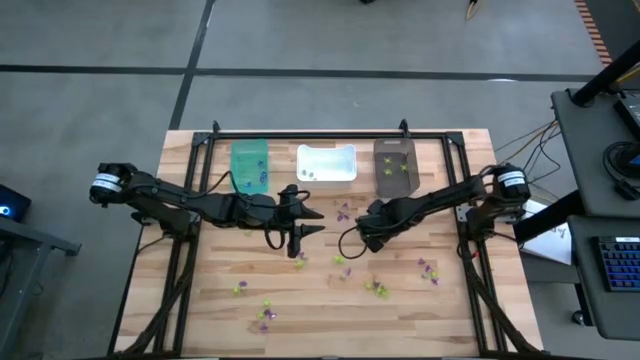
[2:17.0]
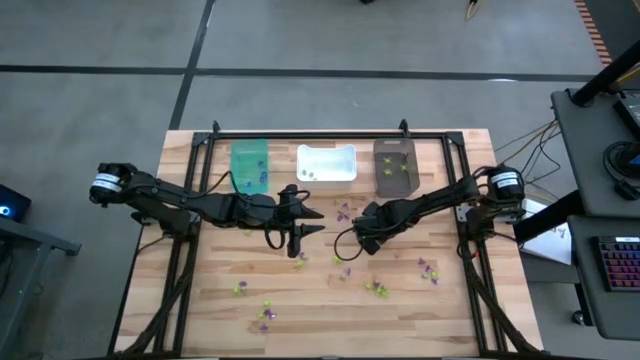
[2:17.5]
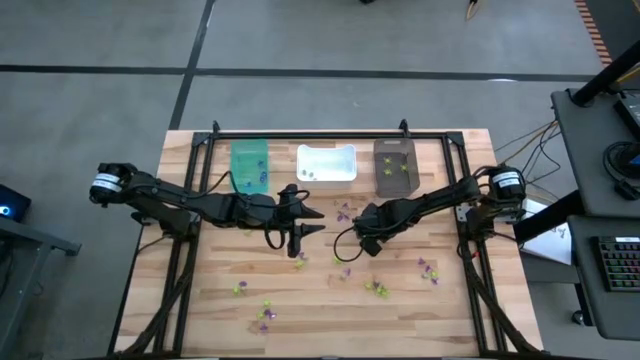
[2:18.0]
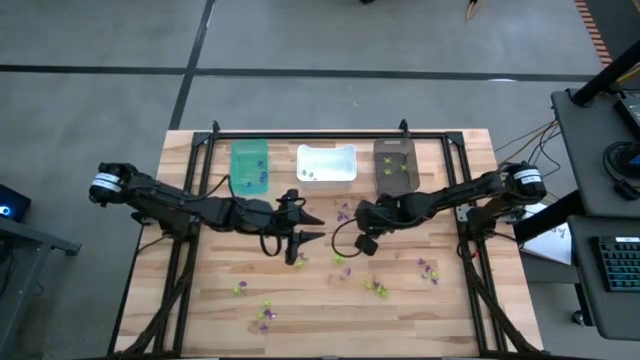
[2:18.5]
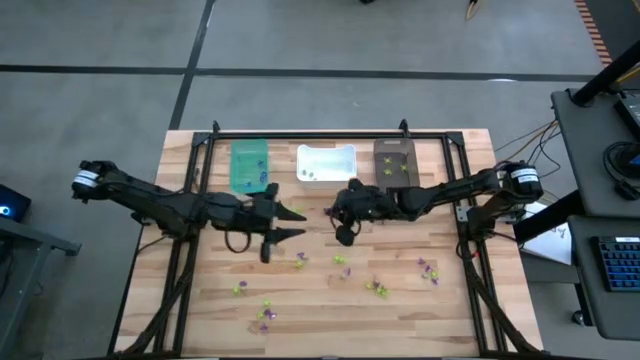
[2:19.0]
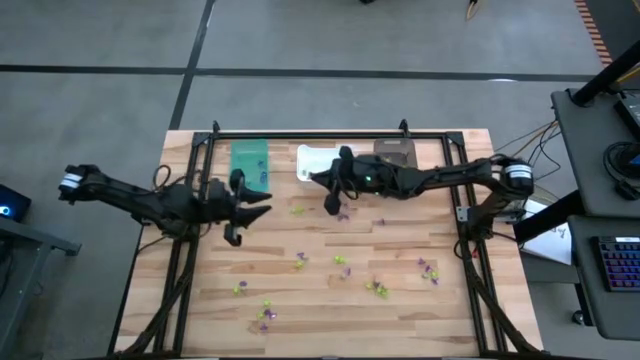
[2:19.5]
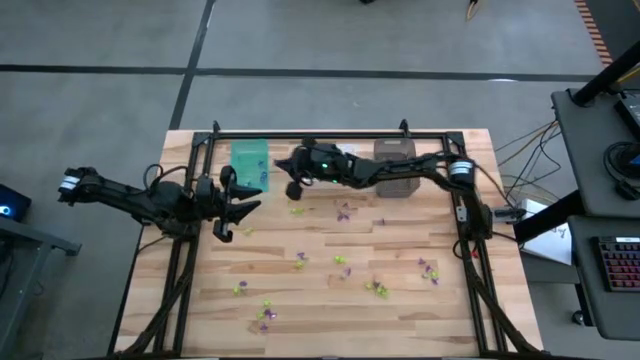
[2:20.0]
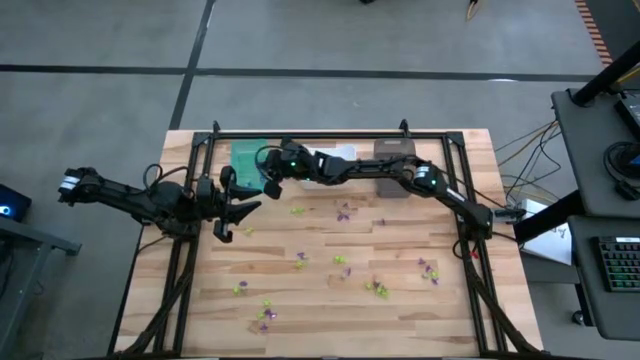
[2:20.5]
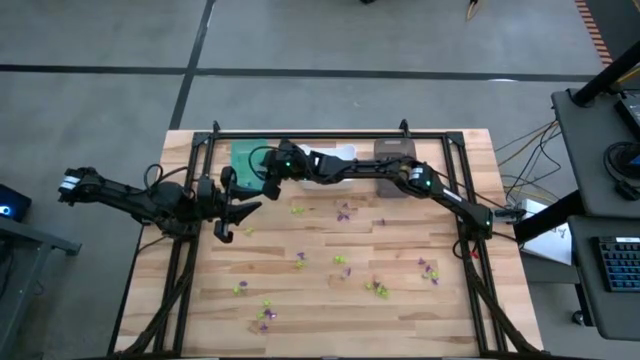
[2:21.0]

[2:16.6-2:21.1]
Task: Sort Halloween decoration
Put the purple witch hat toy into the light blue bin

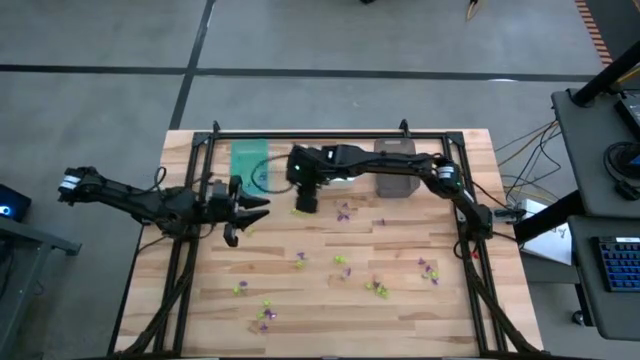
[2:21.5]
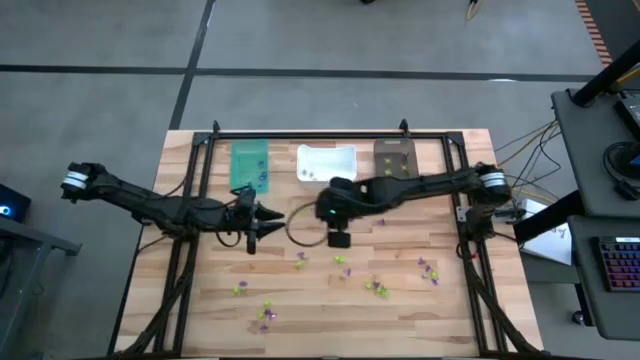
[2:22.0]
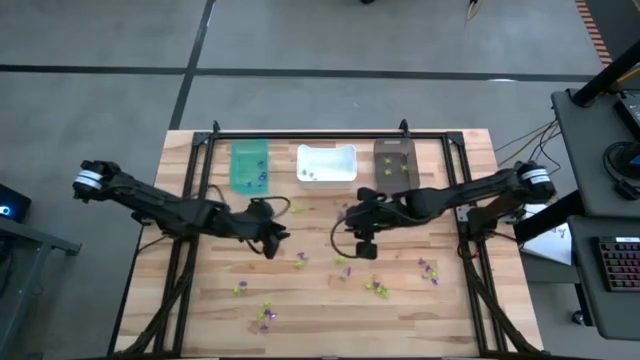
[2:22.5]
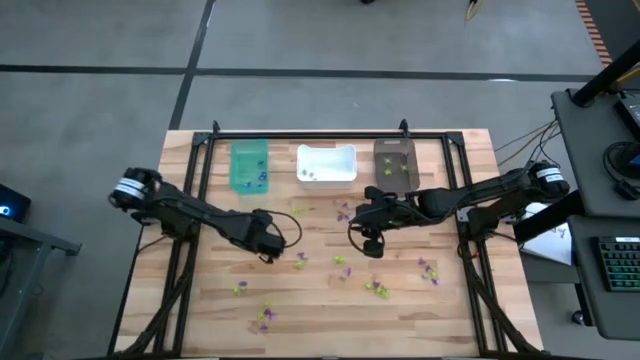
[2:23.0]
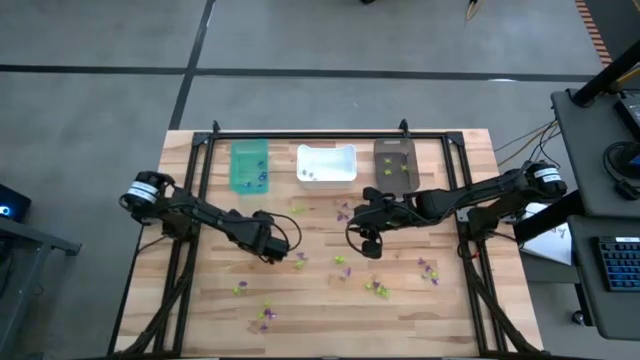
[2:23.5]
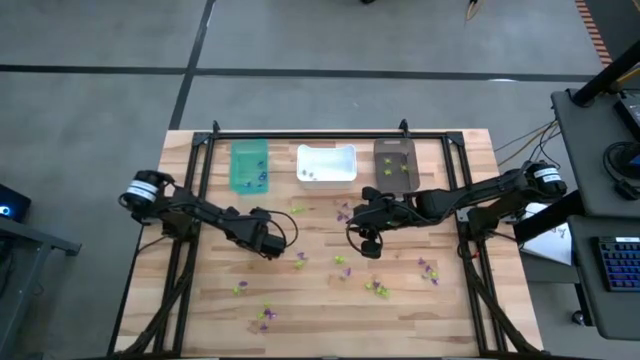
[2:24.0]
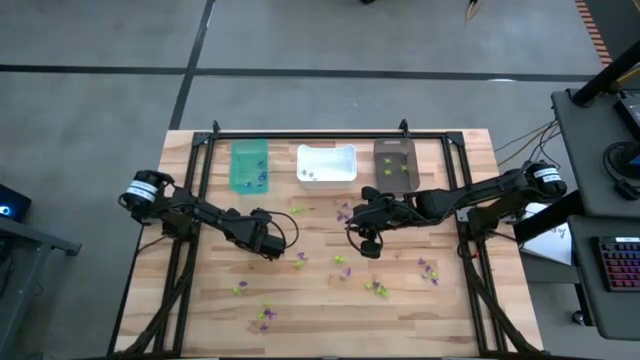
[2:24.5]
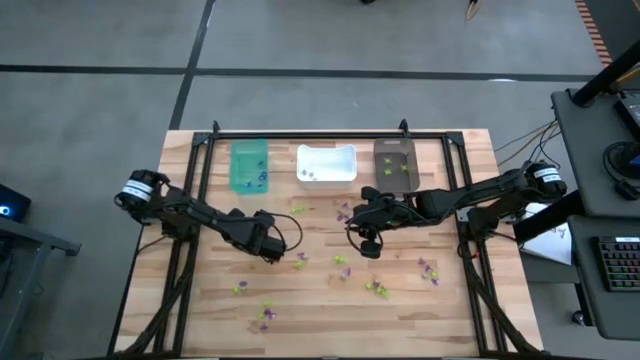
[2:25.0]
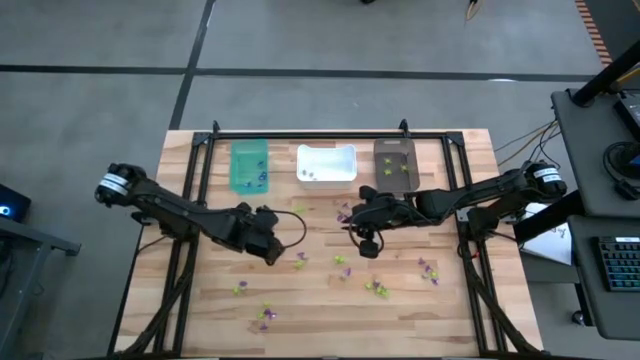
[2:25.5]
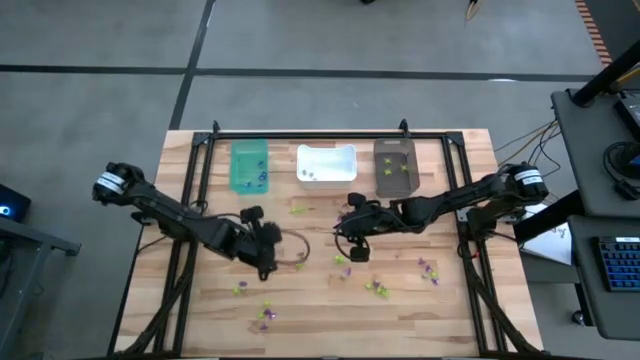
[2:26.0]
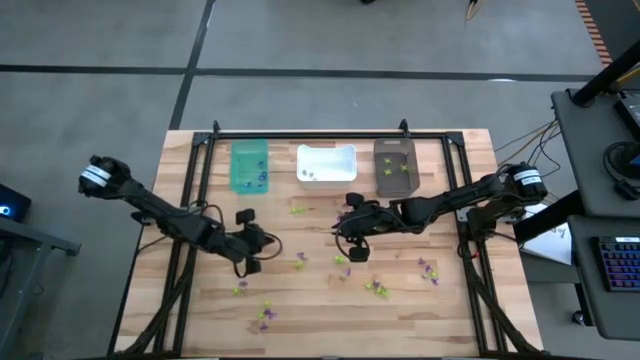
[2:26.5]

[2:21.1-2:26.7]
Put the green spider toy into the black bin

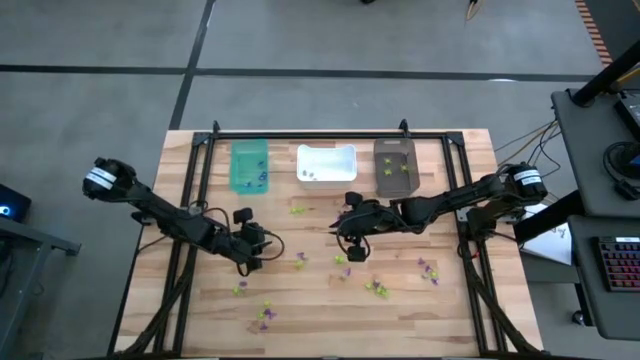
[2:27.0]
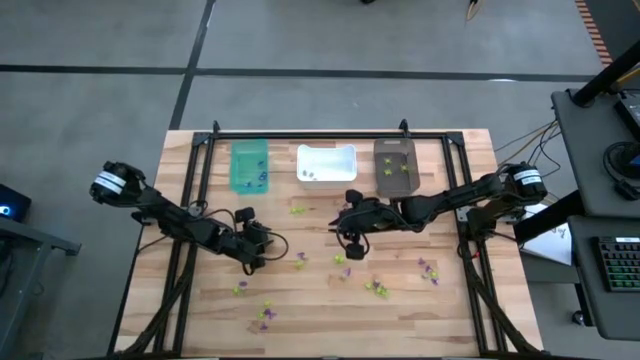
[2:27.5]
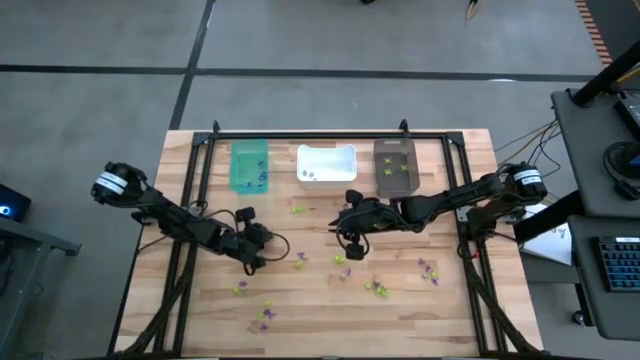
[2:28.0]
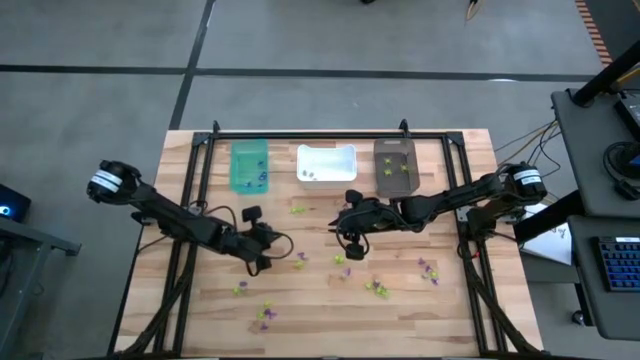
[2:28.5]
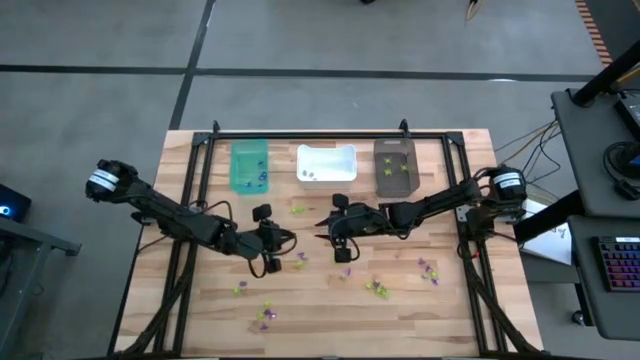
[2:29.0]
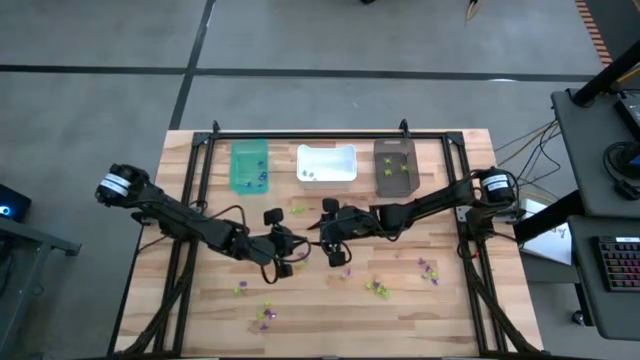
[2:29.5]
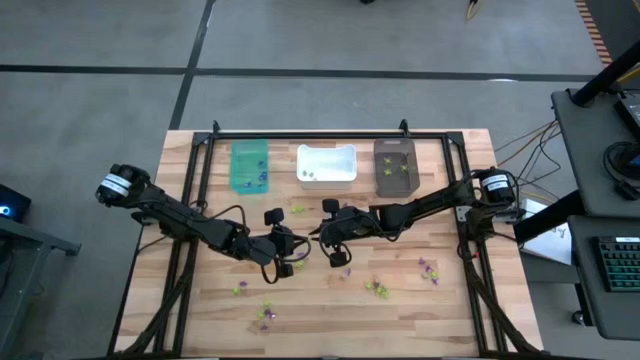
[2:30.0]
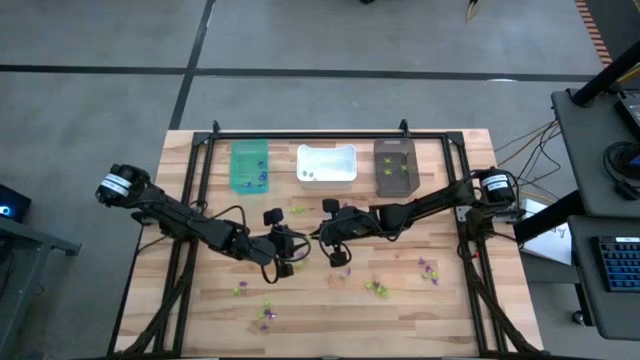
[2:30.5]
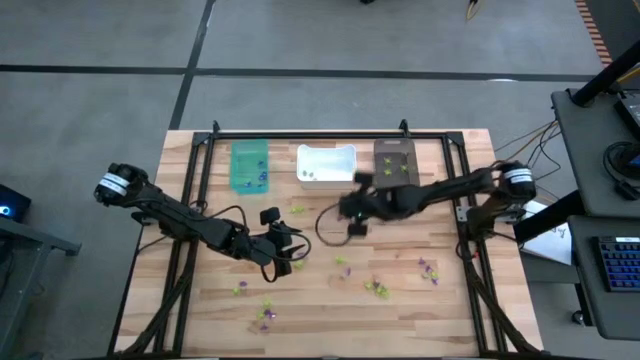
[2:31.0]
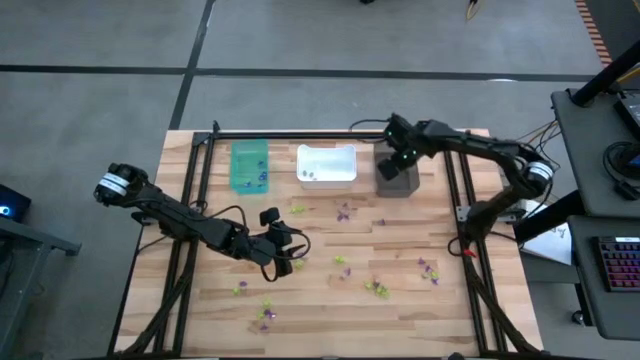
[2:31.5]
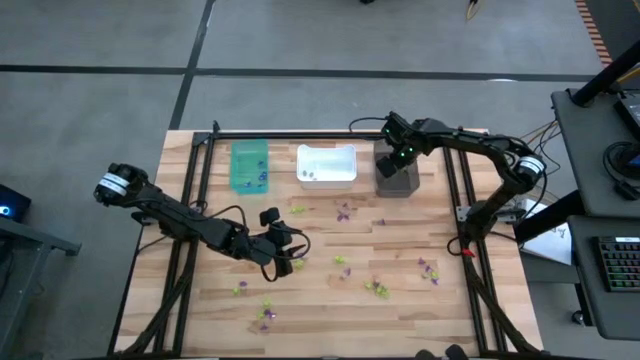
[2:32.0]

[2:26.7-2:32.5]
Put the green spider toy into the black bin

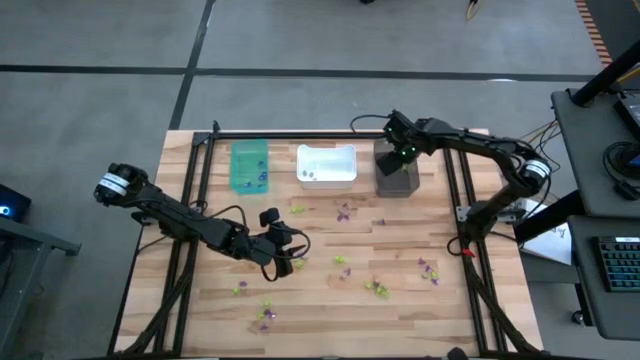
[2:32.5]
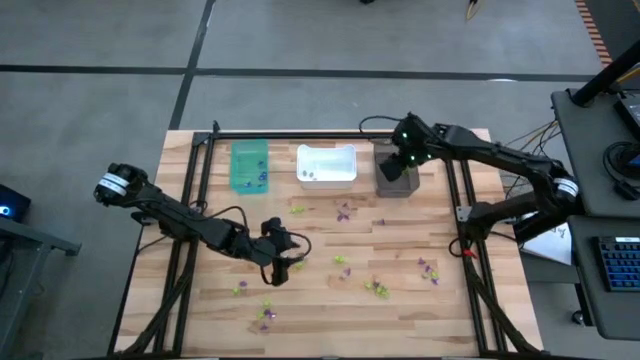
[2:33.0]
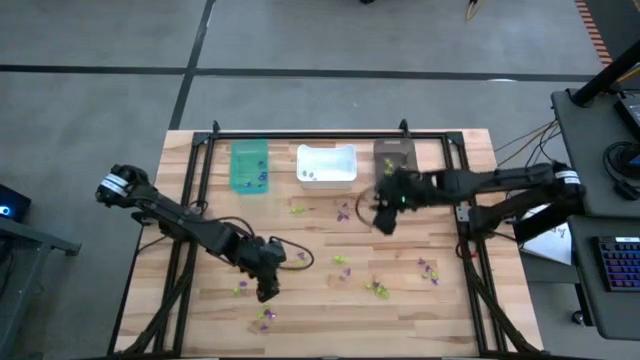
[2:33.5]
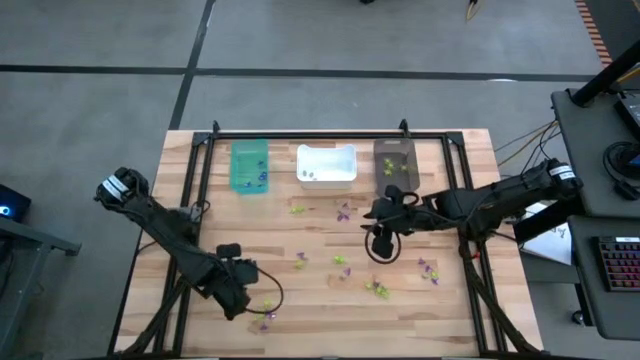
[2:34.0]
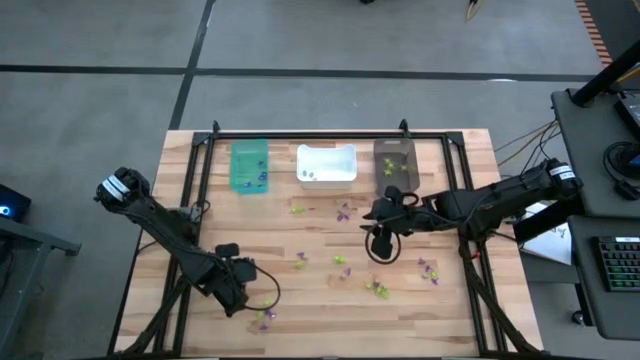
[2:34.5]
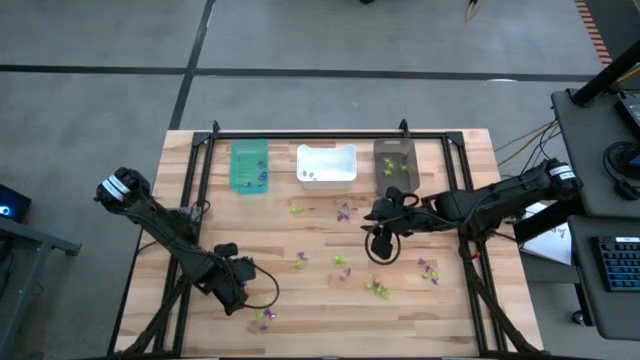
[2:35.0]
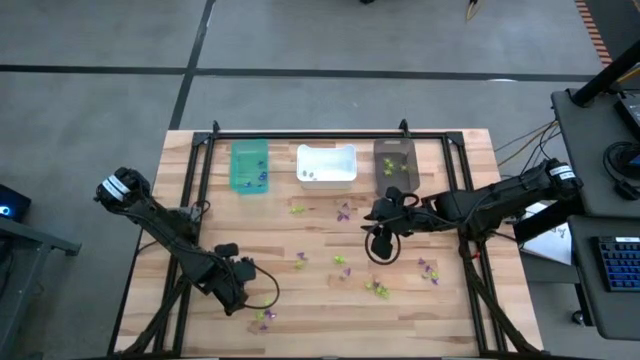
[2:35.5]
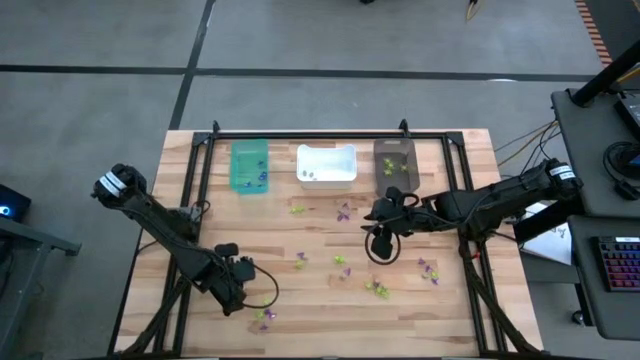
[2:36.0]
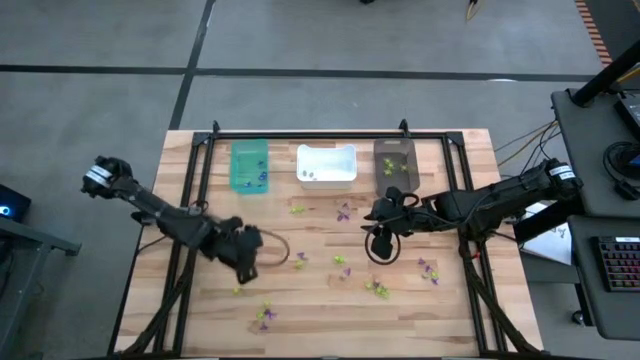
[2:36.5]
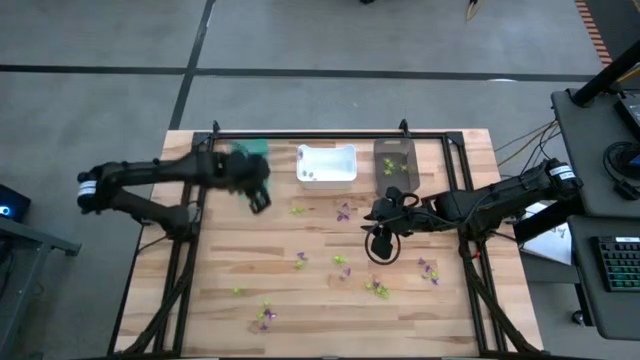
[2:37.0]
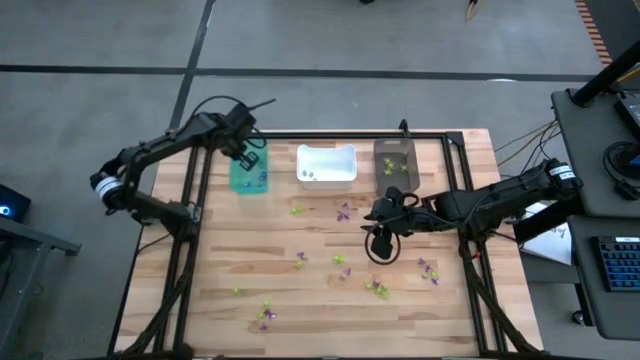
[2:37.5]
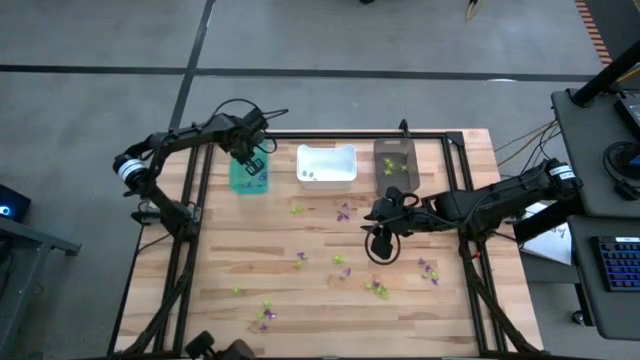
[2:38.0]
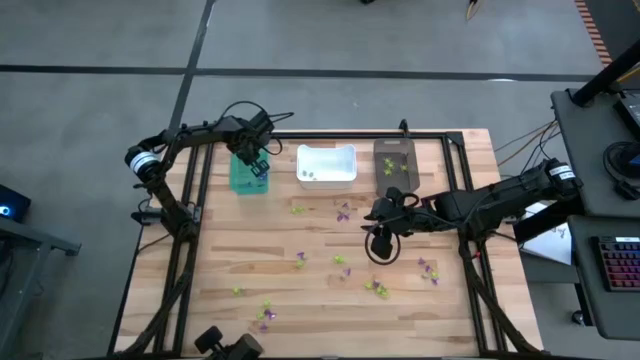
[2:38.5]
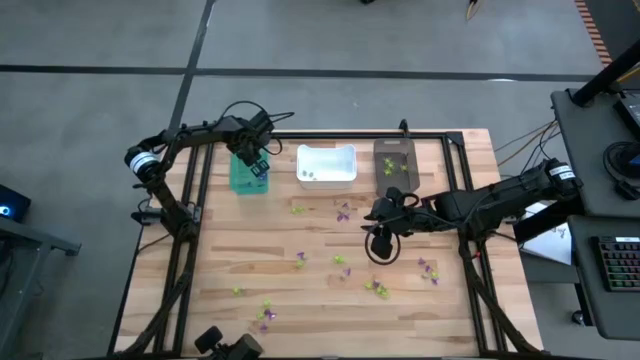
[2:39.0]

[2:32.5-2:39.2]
Put the purple witch hat toy into the light blue bin
